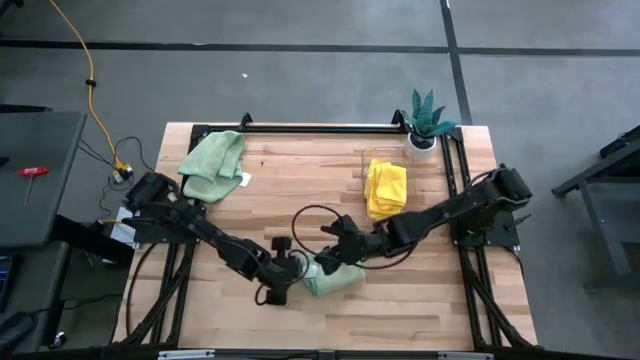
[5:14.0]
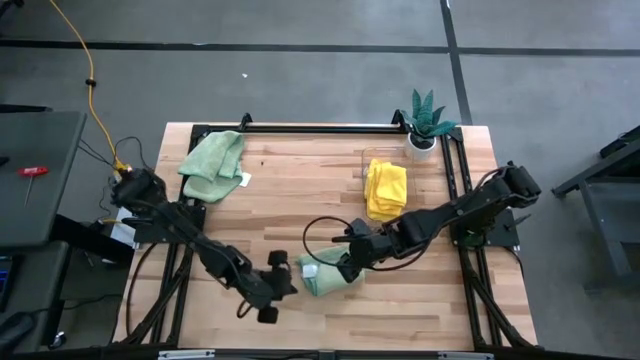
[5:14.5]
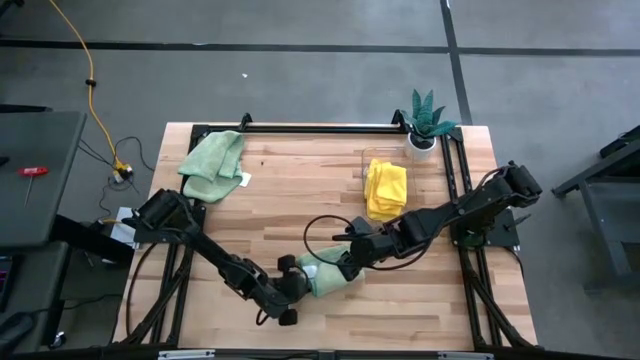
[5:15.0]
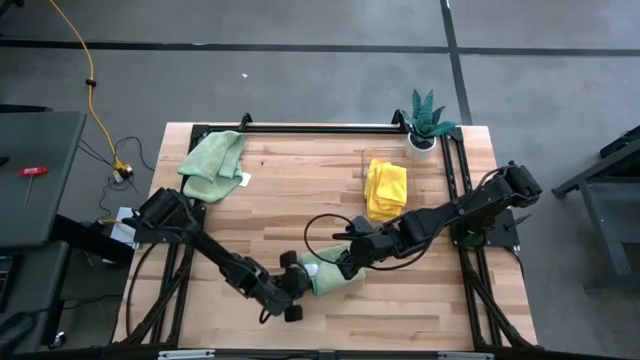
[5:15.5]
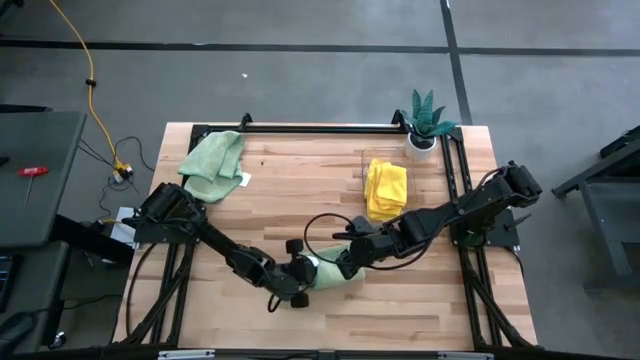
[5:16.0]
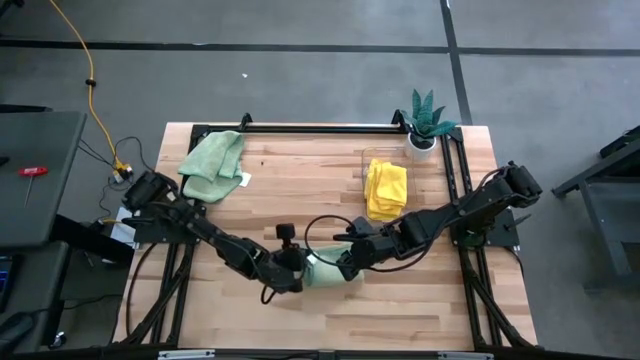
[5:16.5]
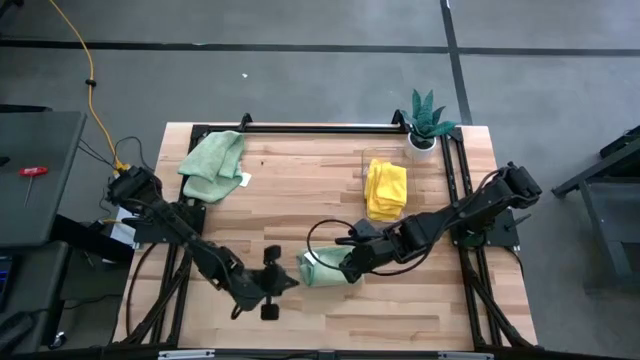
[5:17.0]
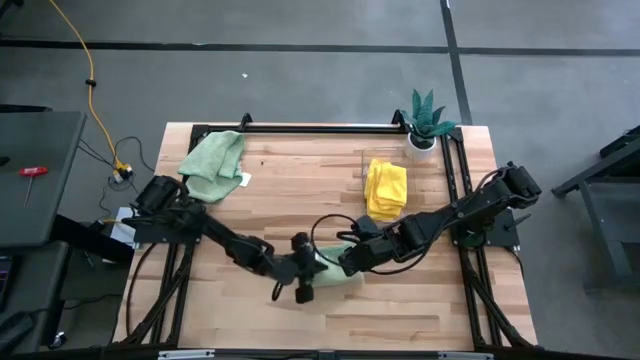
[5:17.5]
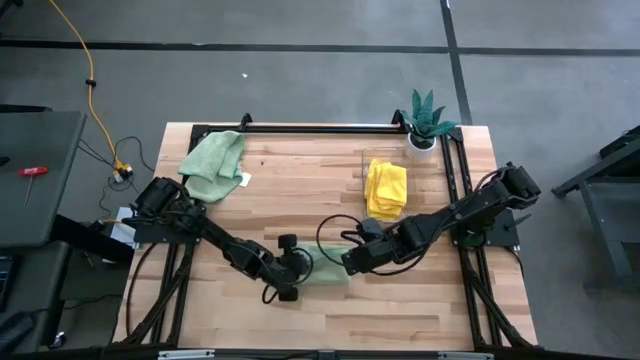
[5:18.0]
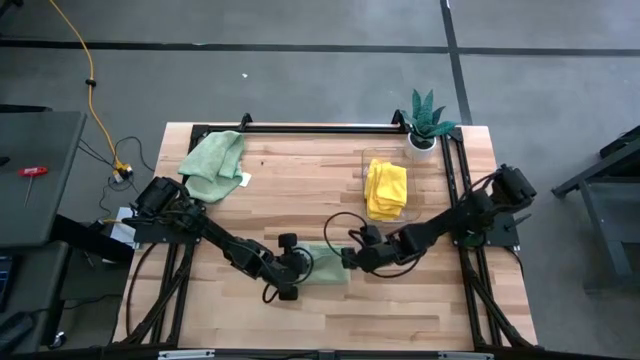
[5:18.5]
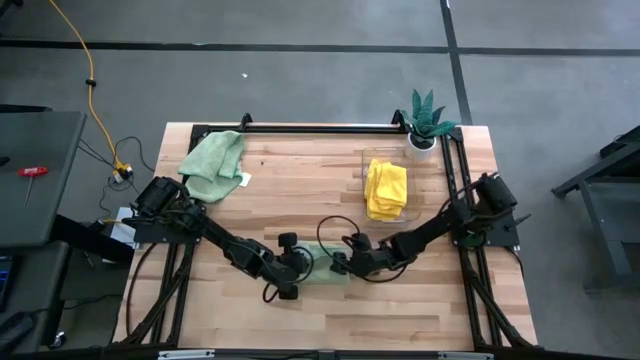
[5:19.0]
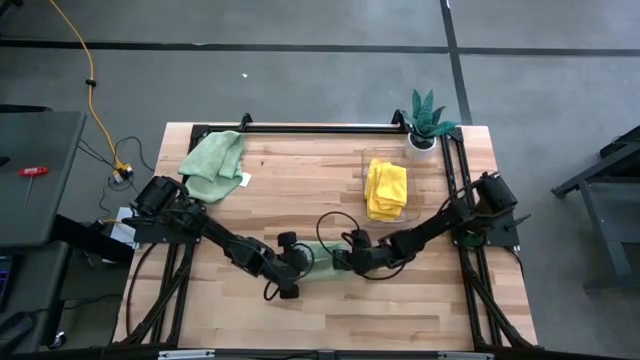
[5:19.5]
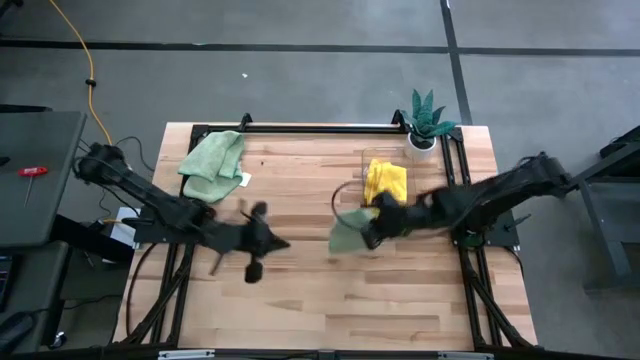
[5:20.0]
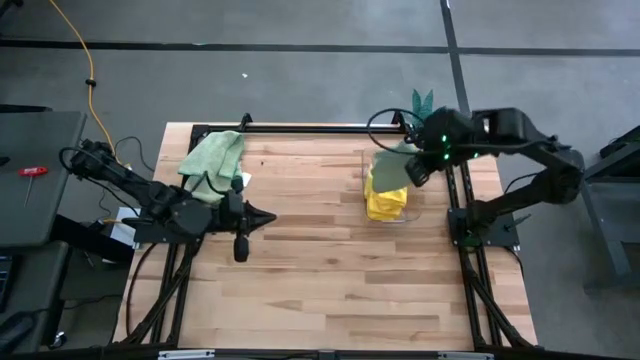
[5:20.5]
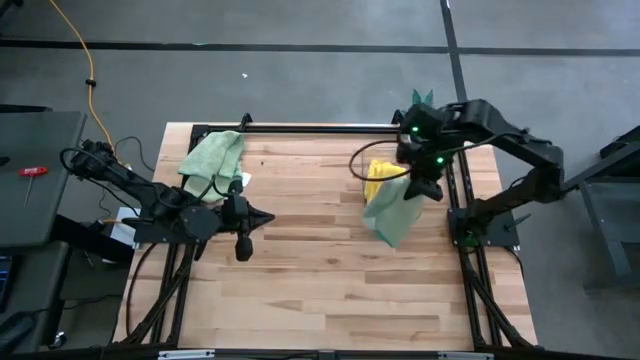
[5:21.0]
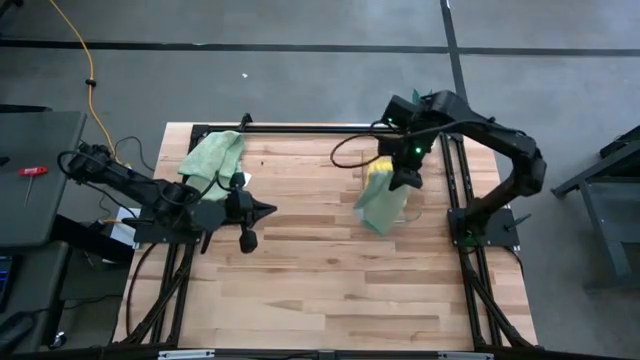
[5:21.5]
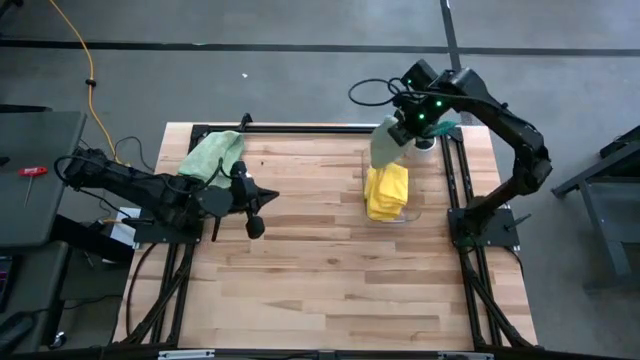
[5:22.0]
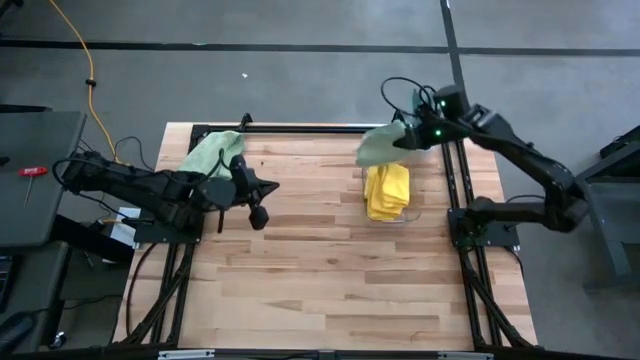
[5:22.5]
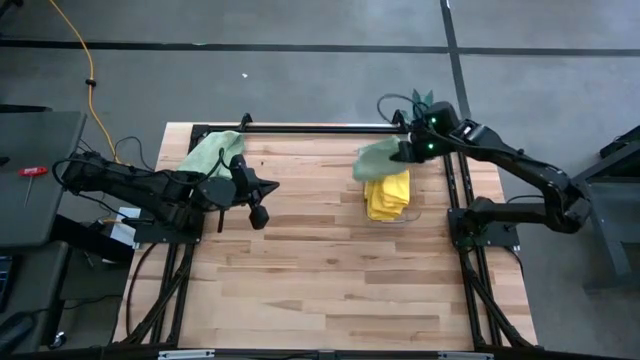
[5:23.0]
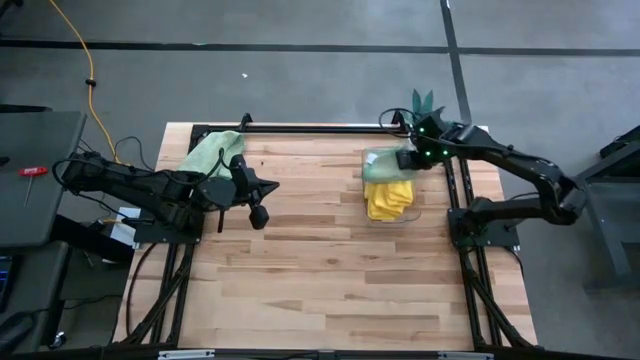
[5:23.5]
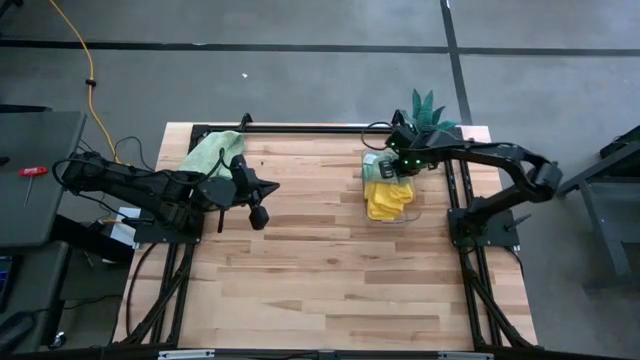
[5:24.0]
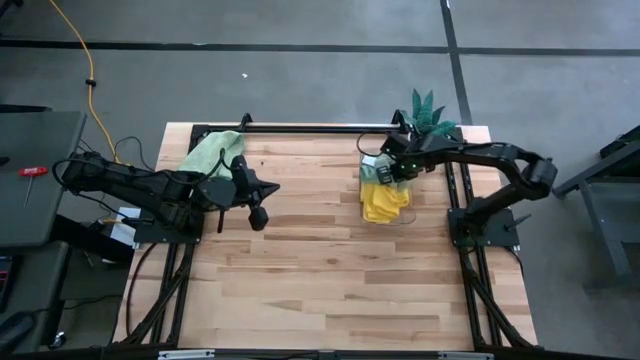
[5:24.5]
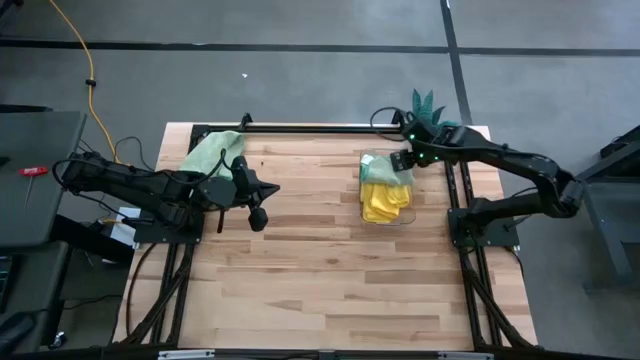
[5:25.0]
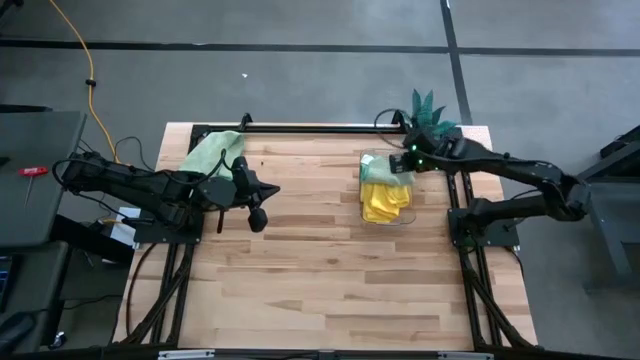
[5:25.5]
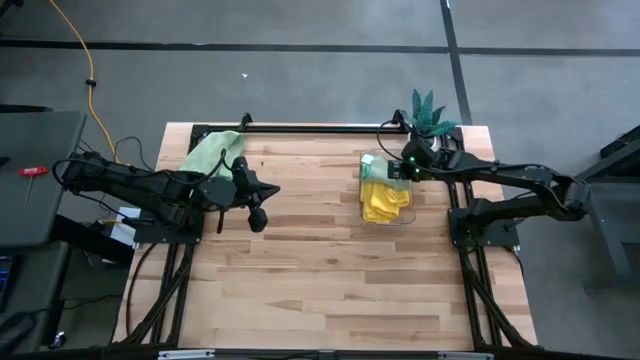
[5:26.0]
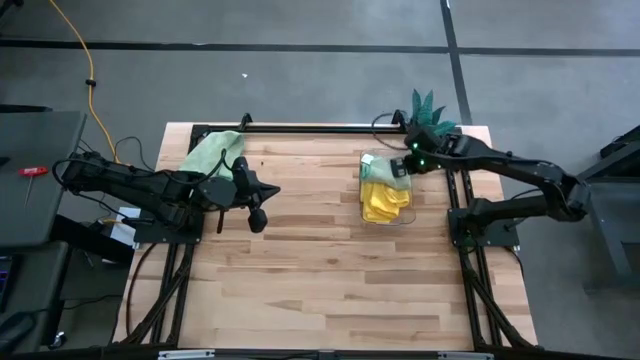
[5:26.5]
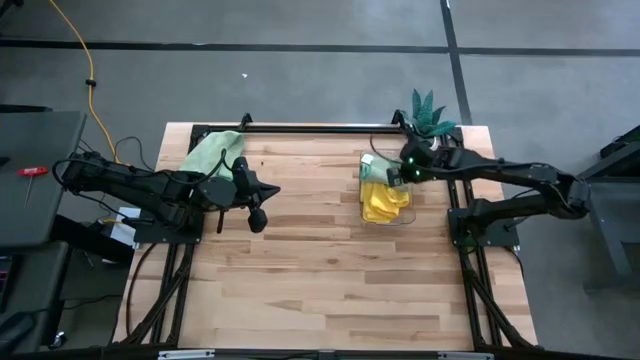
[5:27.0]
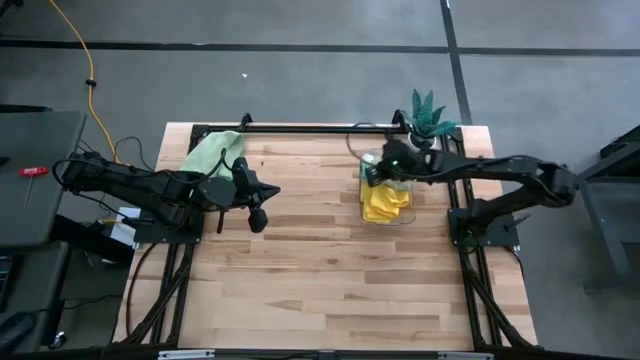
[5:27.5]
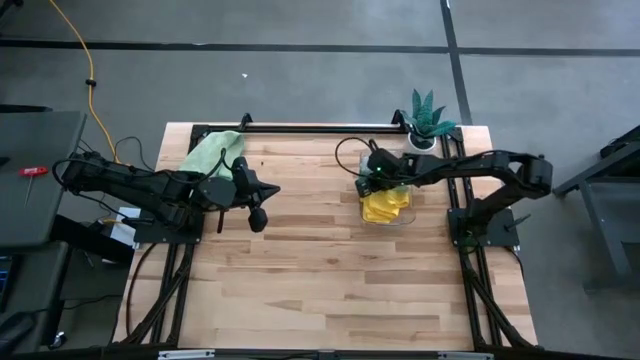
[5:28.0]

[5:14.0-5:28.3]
Task: Fold microfiber towels
Put the folded green microfiber towel into the transparent bin

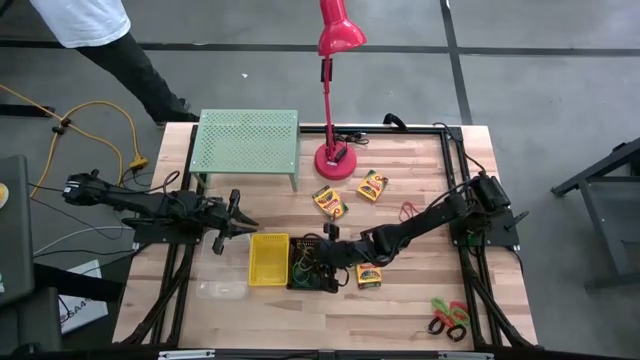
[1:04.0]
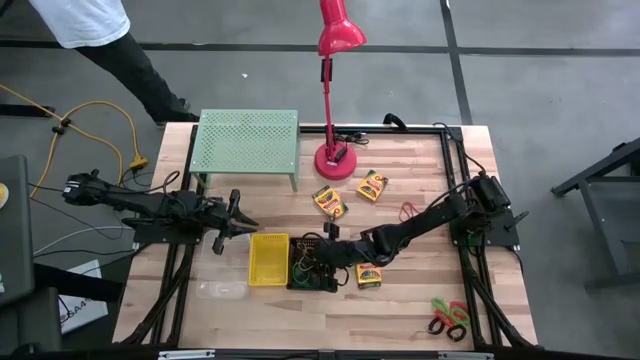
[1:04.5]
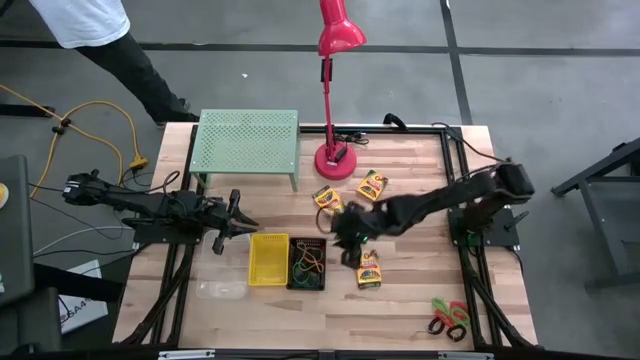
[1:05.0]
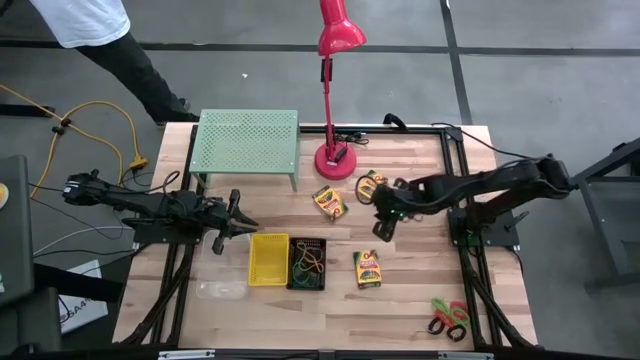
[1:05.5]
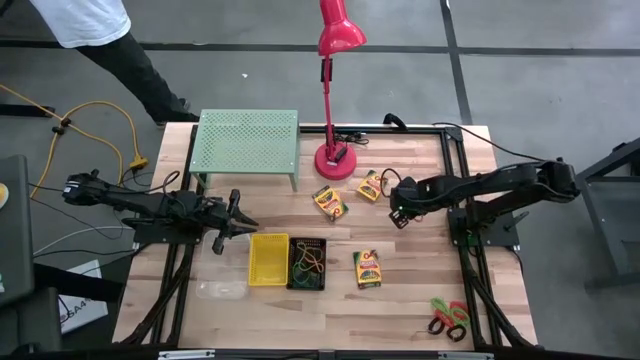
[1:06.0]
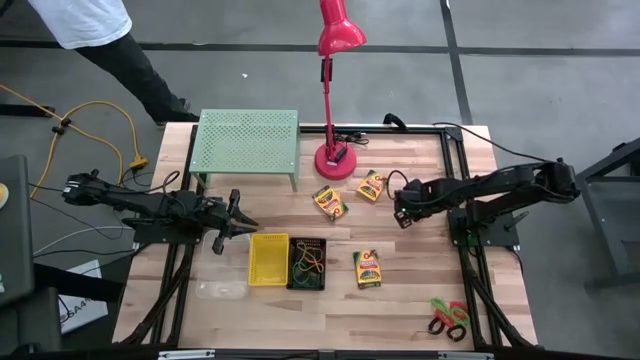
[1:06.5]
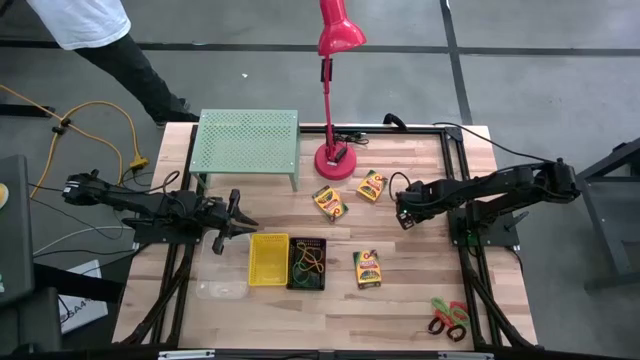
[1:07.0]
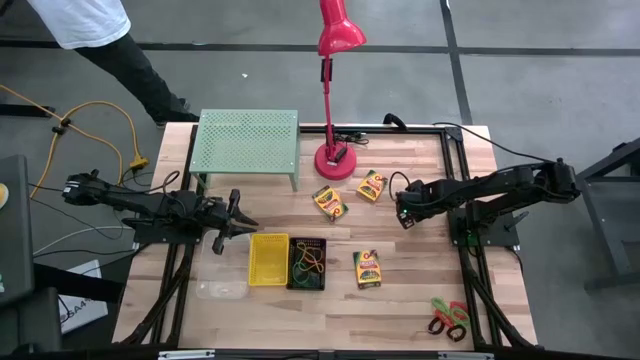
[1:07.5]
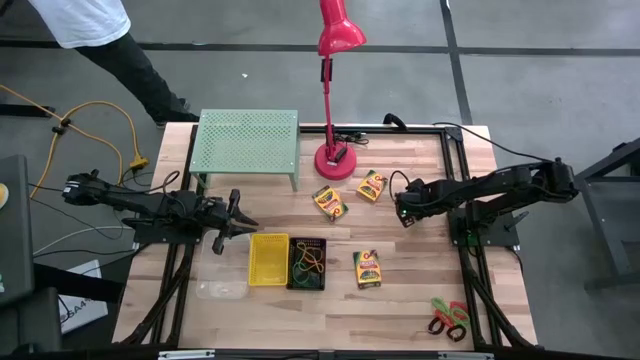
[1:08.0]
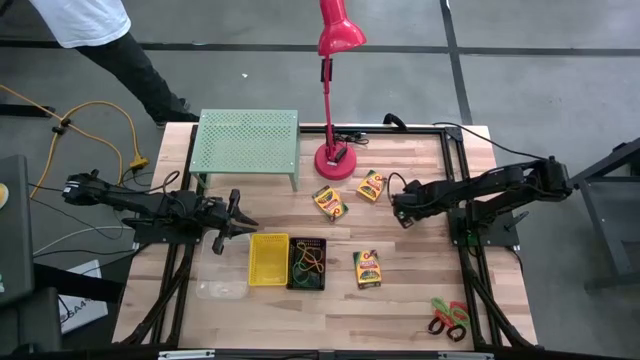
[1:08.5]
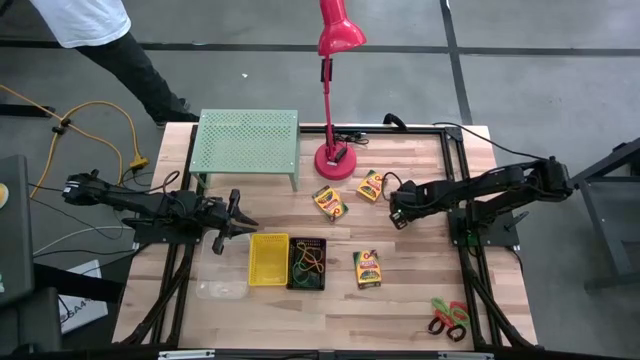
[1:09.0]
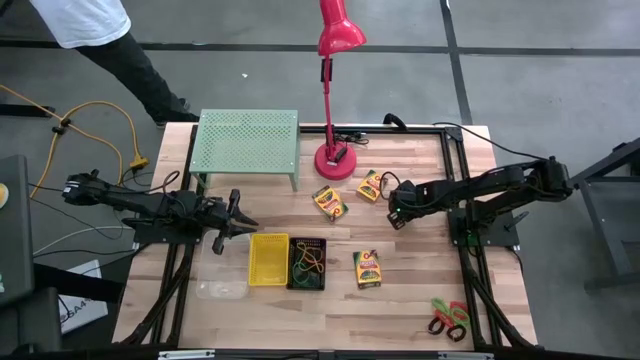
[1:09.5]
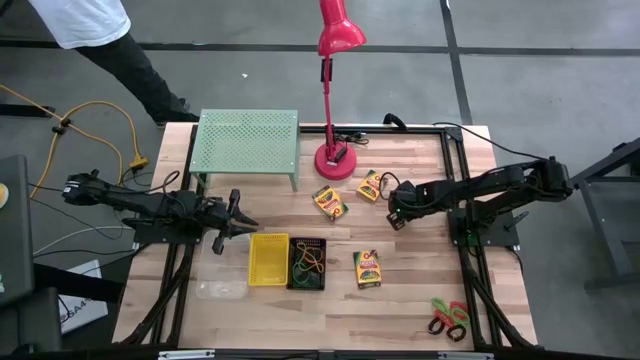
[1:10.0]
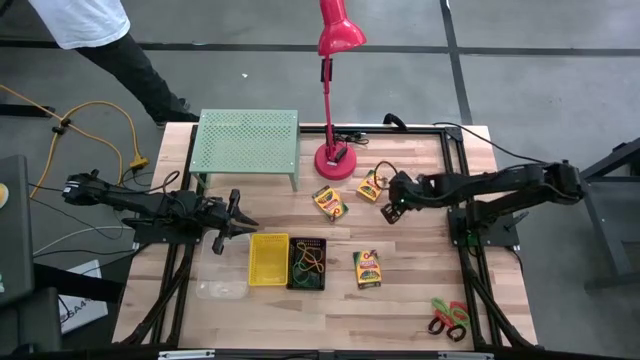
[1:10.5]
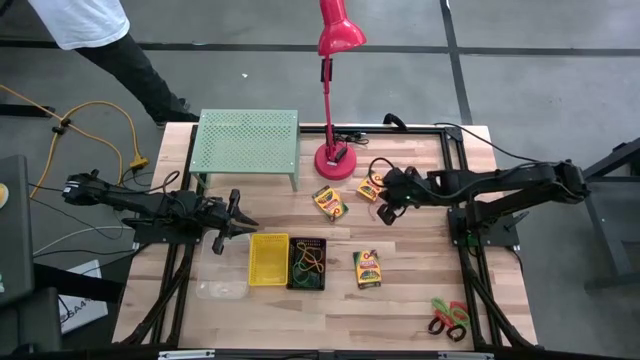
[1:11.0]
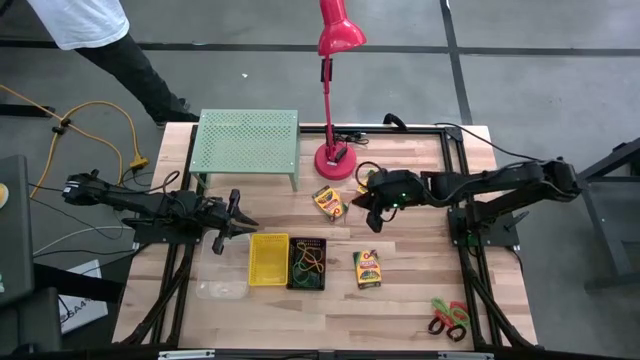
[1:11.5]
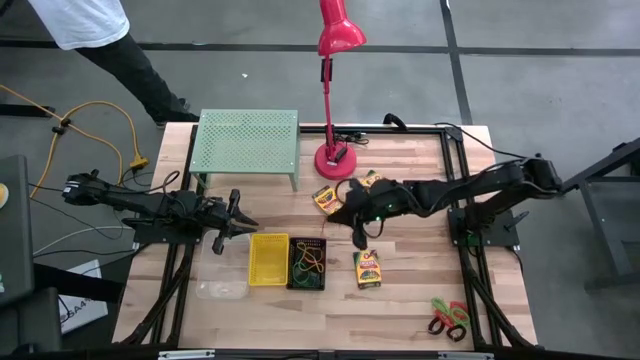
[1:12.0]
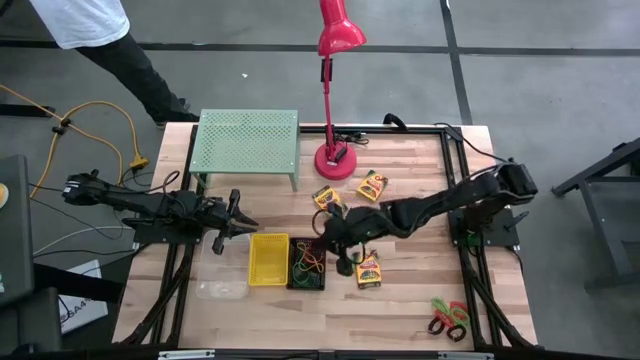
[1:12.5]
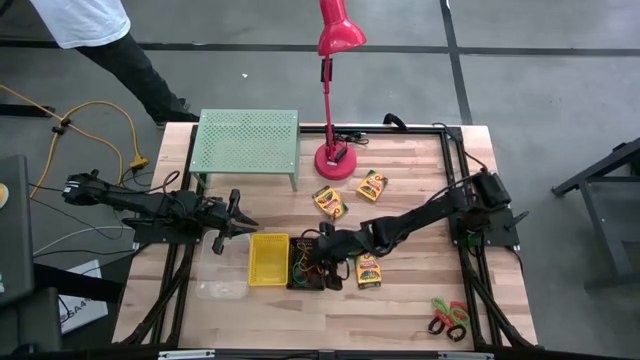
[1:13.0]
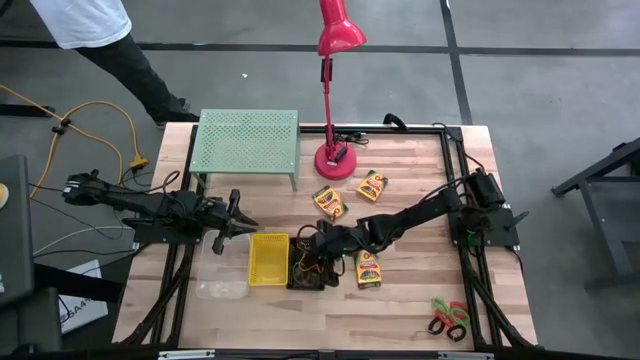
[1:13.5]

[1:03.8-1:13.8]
Task: Pick & Place Office Desk Supplies
Put the red rubber band into the black bin
